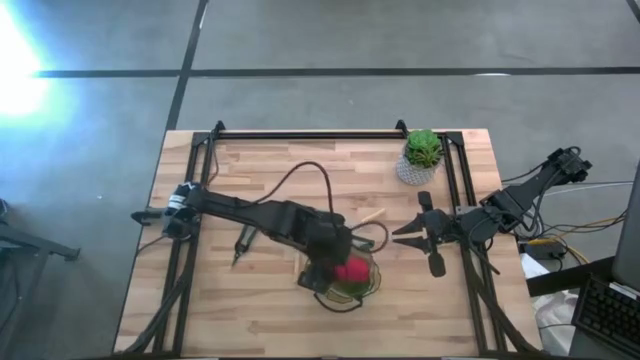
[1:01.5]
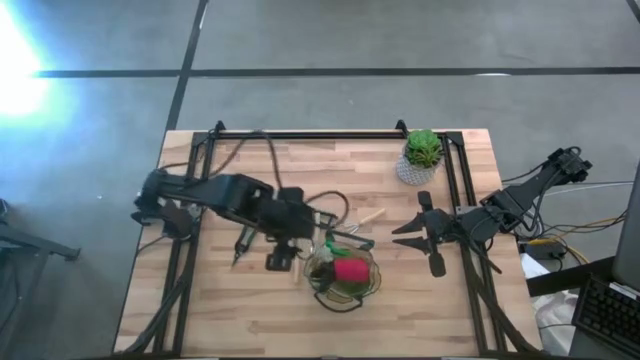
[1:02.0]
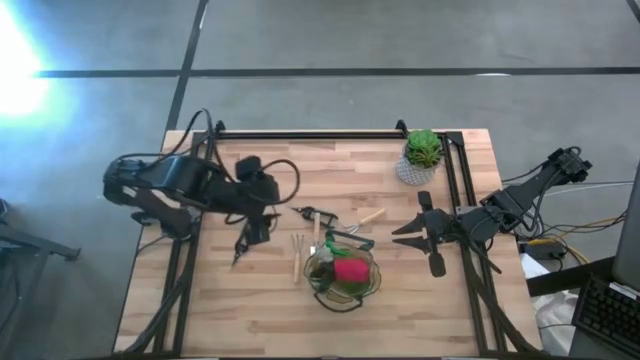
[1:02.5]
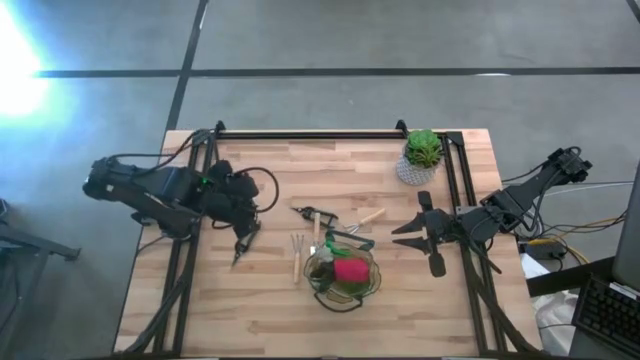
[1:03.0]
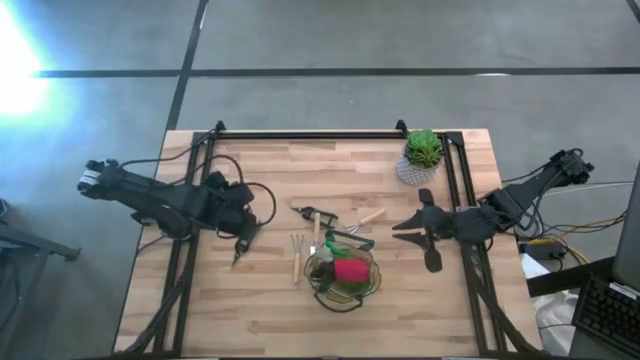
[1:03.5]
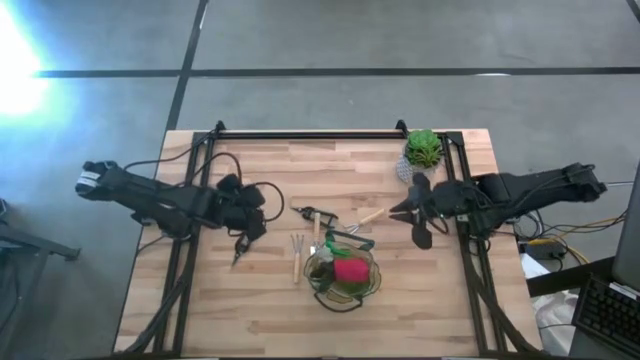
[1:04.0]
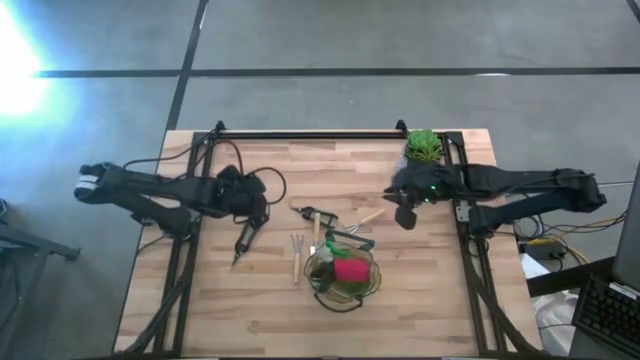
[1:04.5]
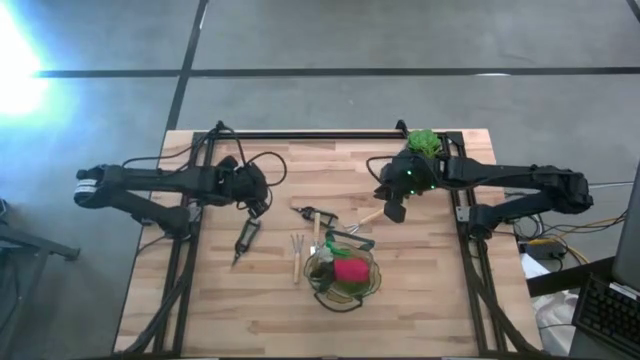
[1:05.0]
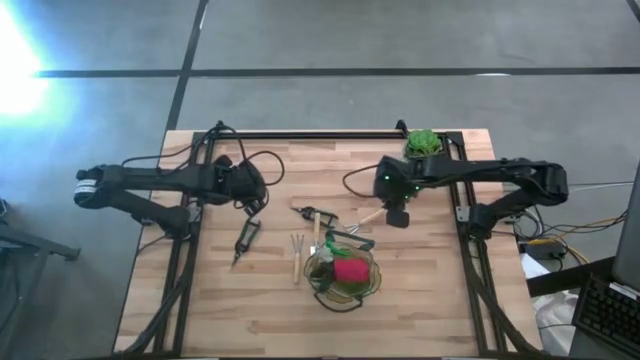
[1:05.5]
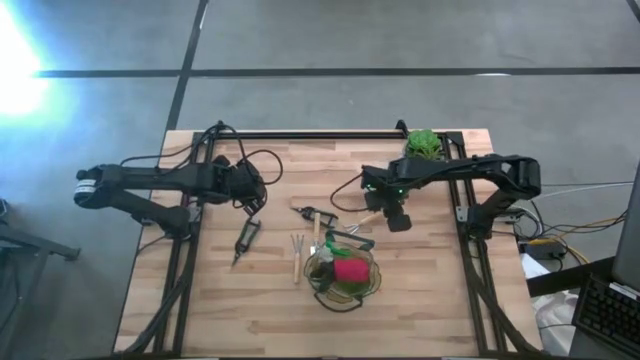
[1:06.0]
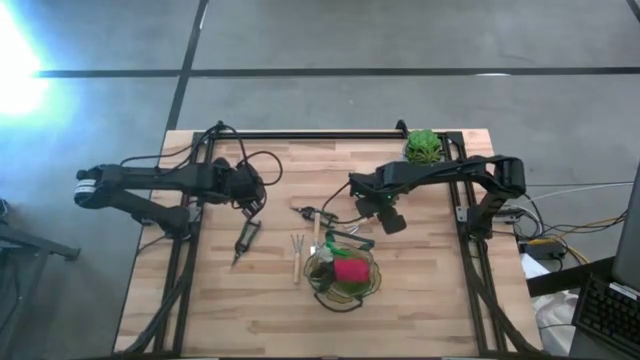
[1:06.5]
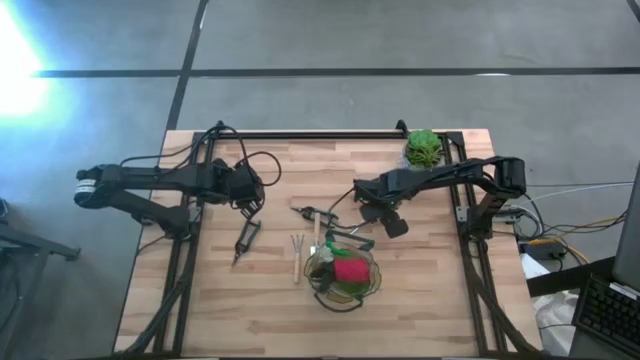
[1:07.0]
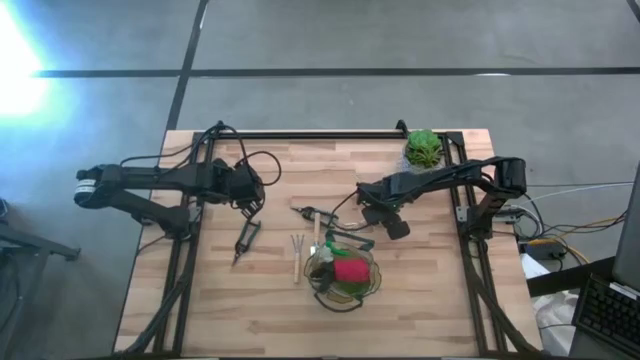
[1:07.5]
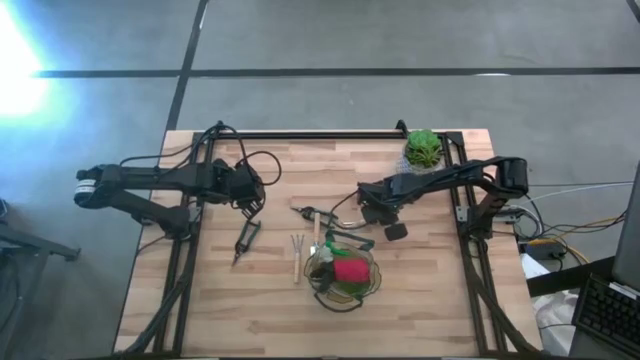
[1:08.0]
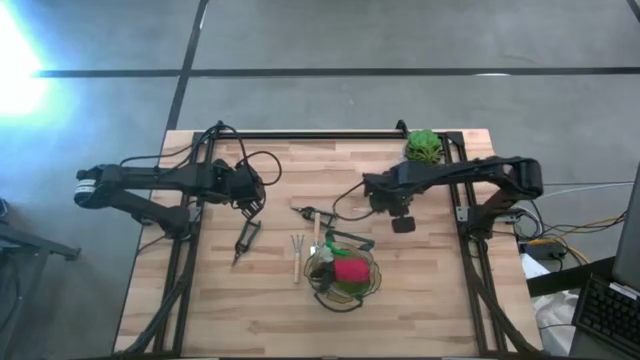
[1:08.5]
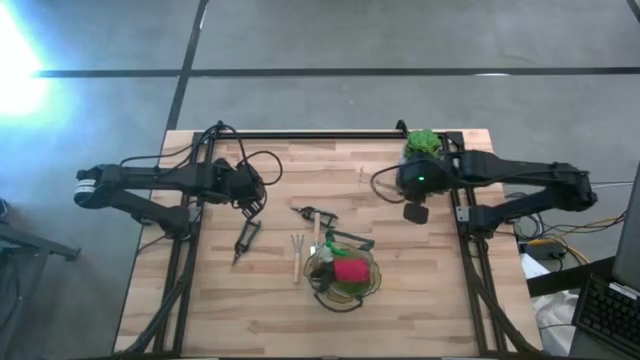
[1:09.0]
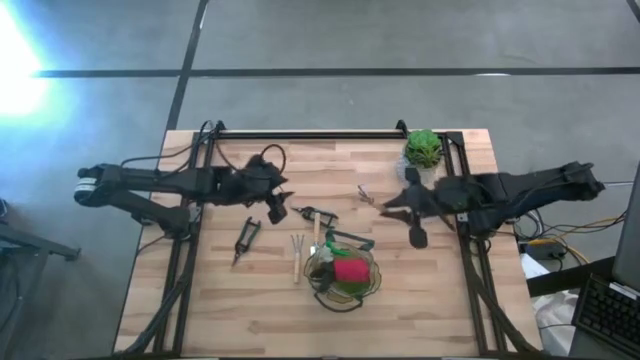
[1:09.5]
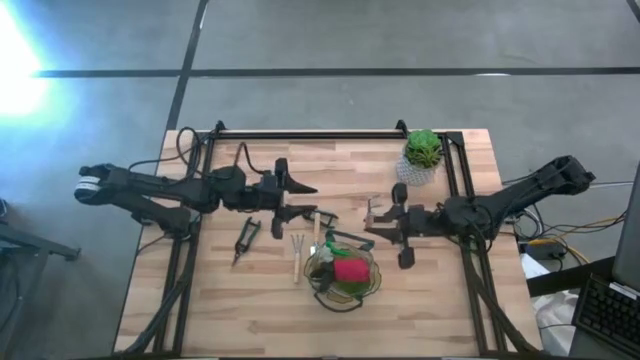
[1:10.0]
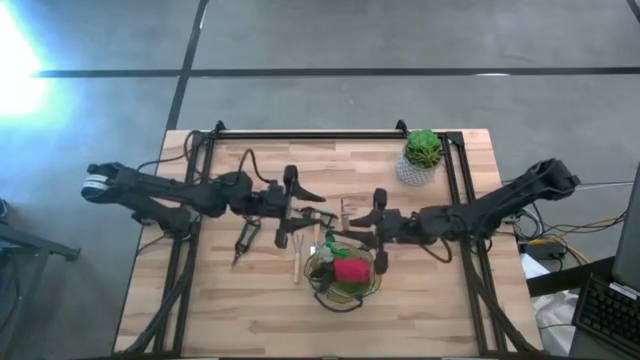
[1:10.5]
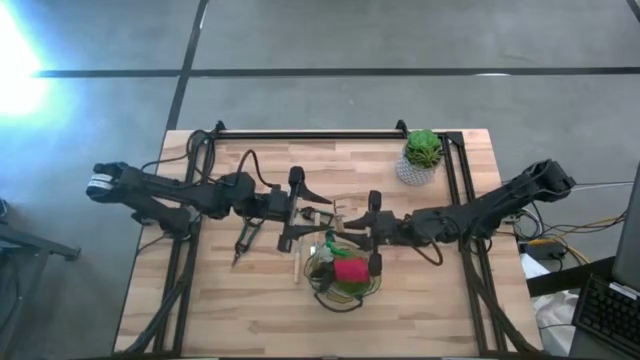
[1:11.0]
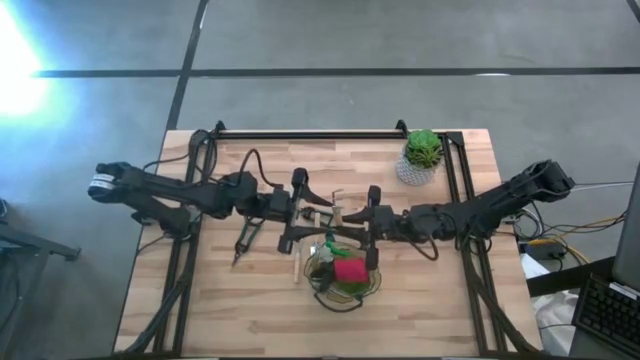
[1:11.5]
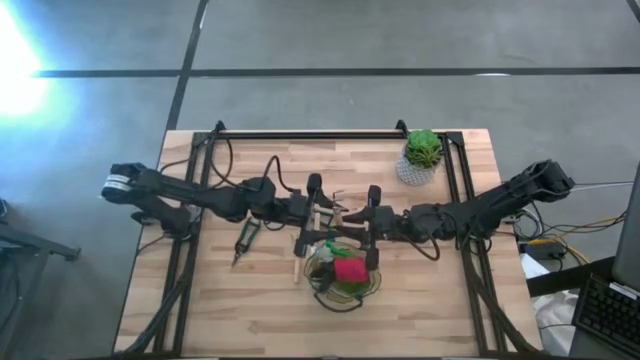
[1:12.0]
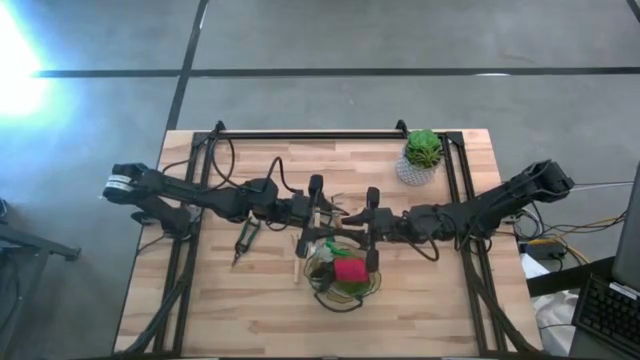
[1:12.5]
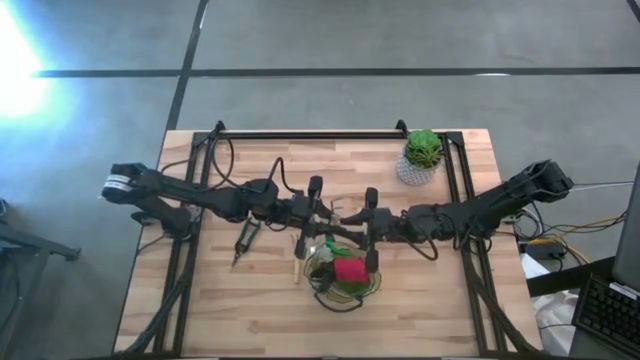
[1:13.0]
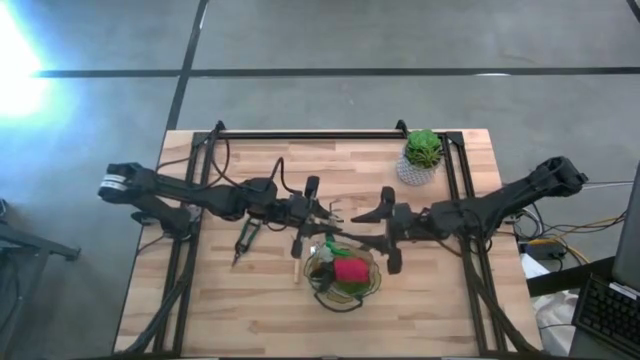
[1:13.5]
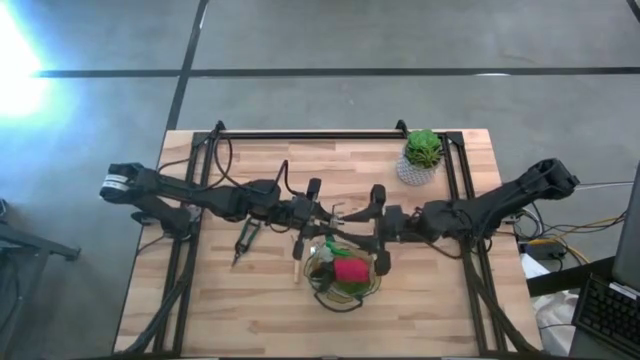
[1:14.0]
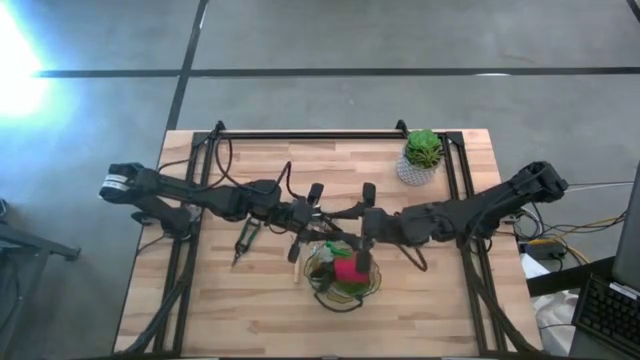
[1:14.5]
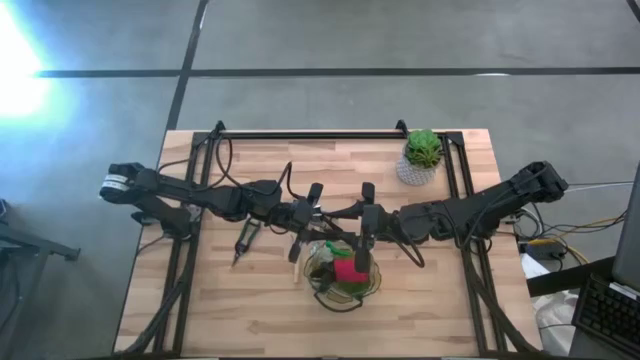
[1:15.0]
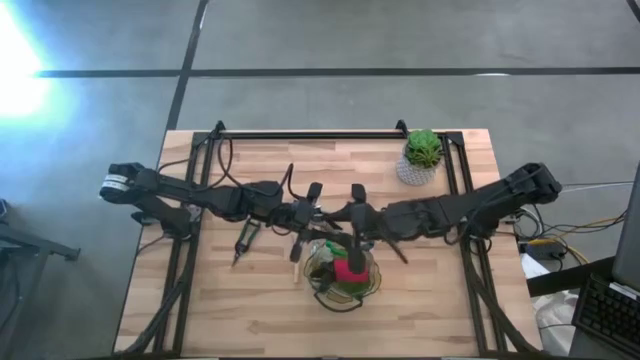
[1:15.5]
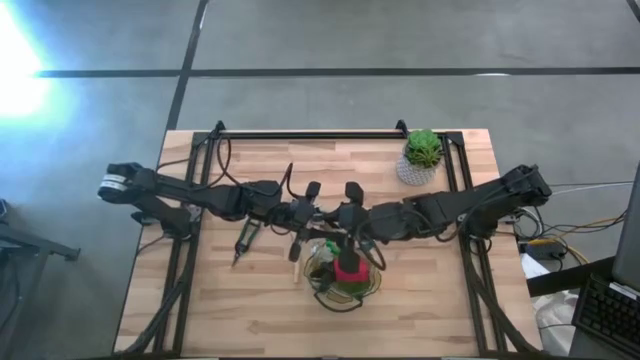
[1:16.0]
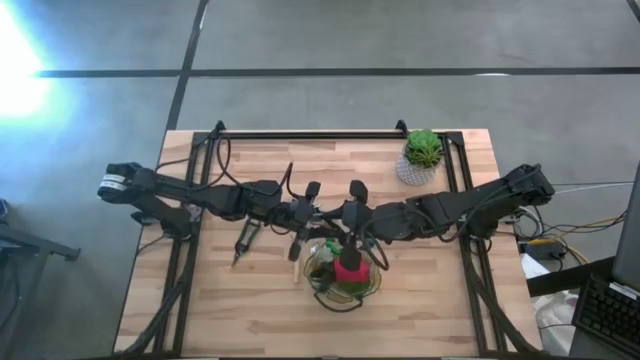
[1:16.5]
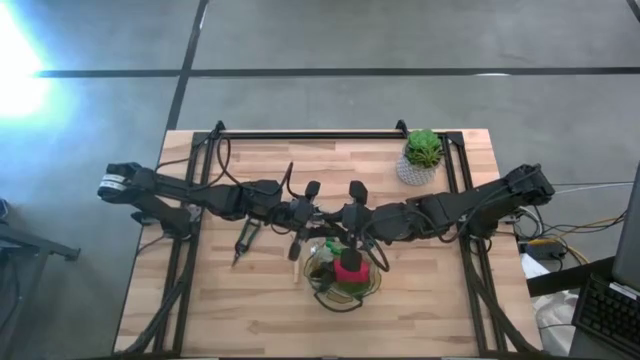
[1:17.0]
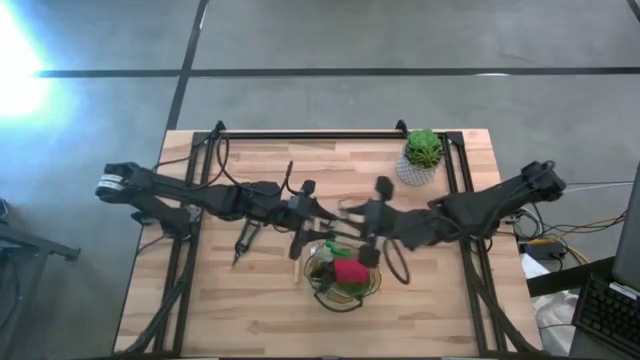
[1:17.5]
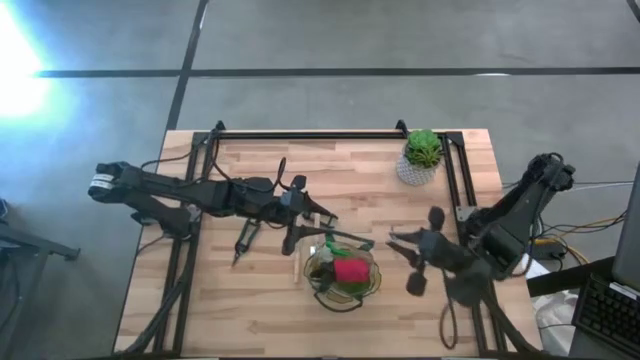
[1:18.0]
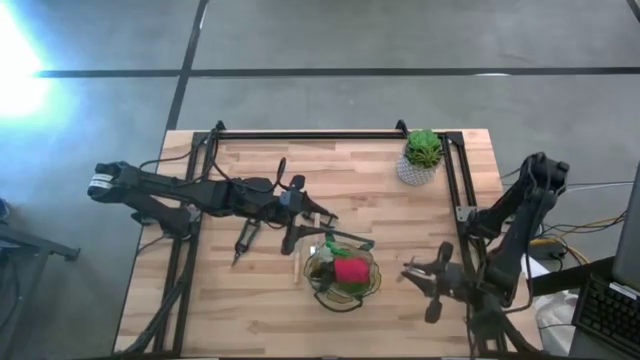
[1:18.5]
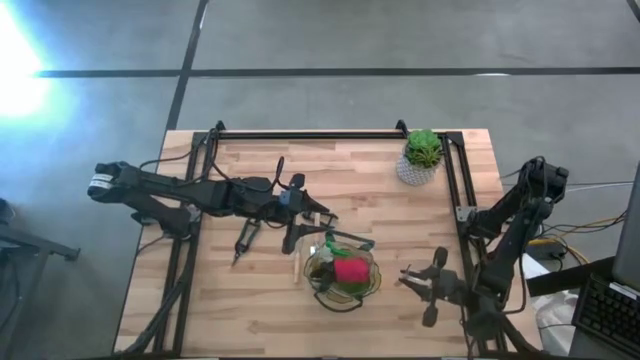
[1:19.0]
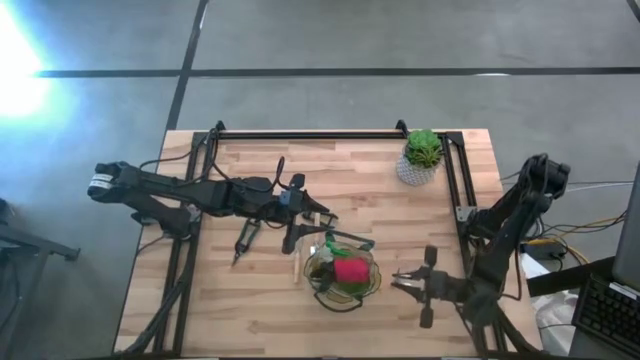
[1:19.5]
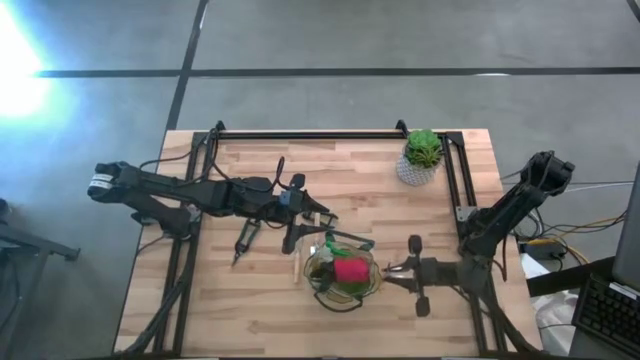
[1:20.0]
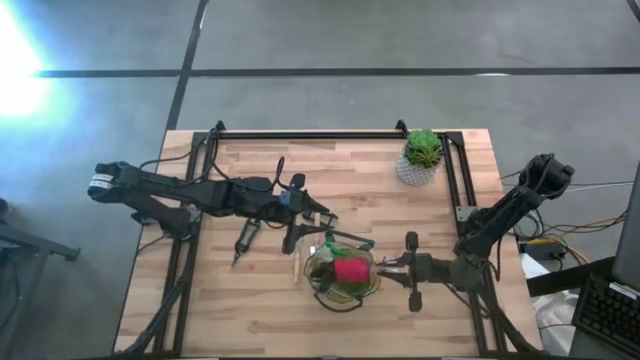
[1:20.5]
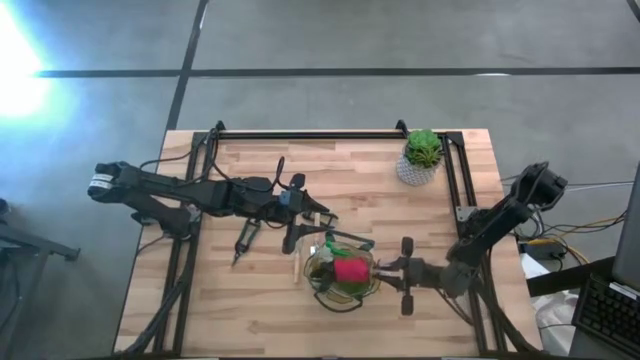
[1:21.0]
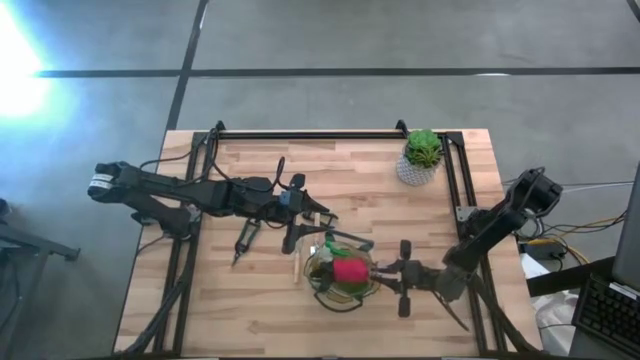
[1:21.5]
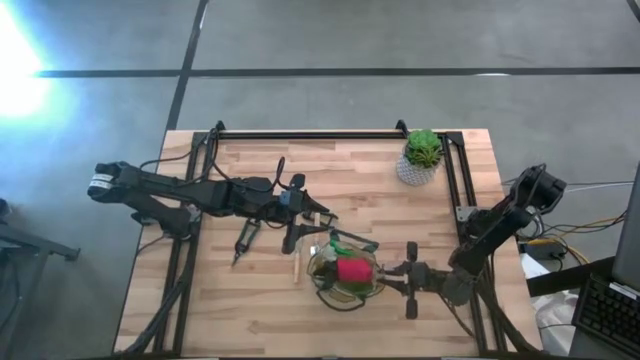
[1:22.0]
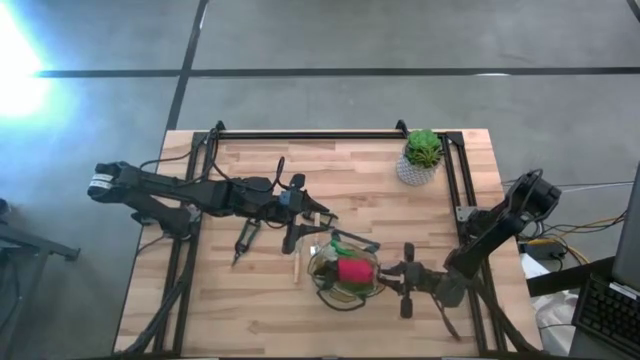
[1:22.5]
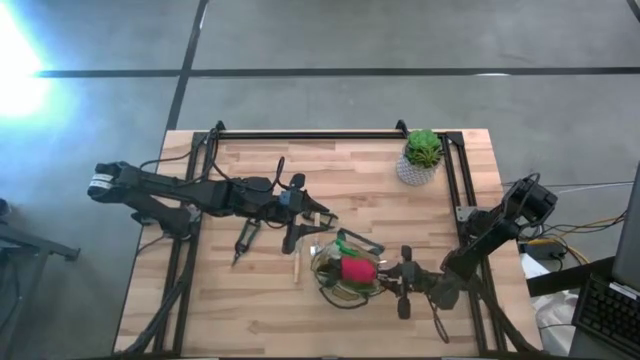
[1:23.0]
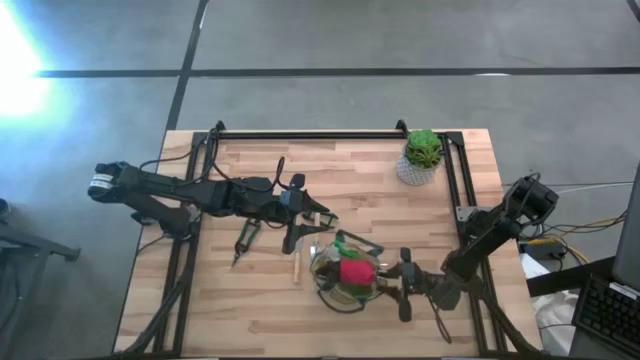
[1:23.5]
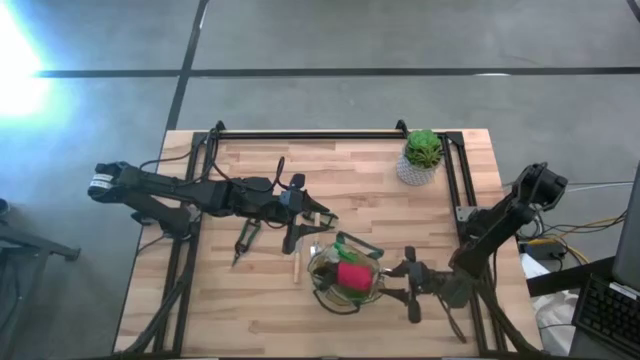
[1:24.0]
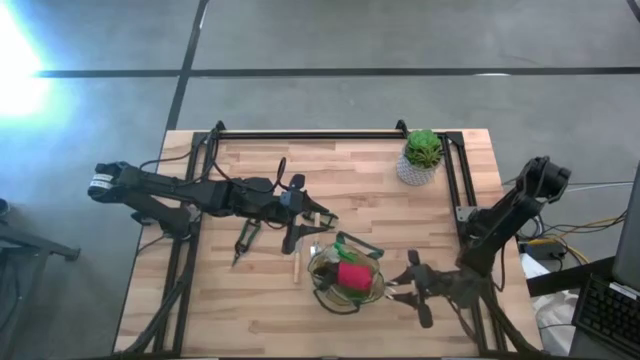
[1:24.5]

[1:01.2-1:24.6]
Task: Pick & Place Garden tools in Gardening bag
Put the right brown hand rake into the white gardening bag
